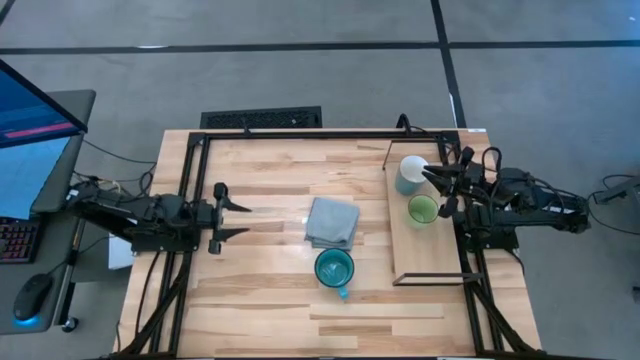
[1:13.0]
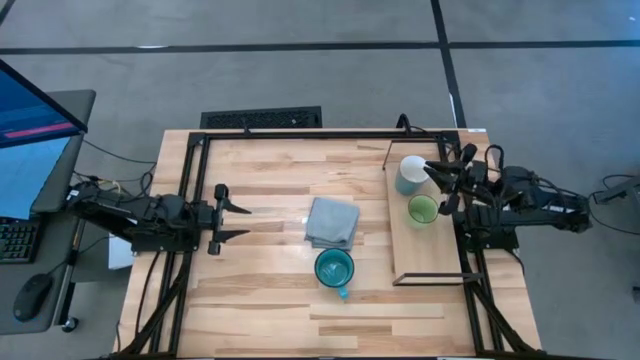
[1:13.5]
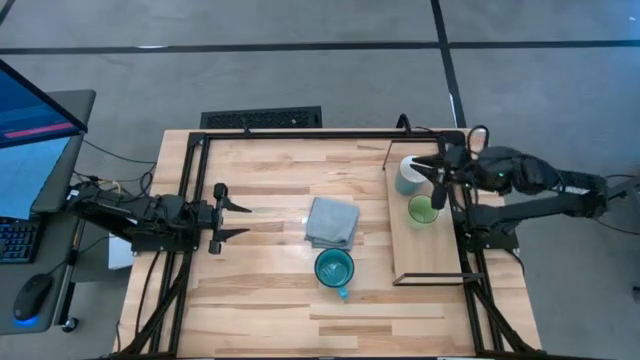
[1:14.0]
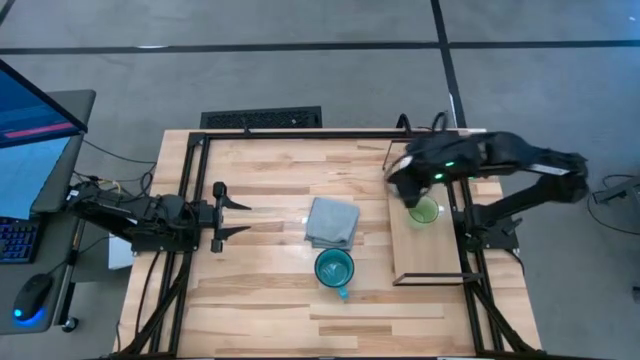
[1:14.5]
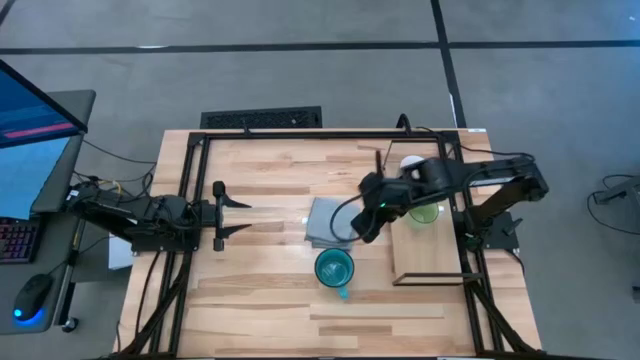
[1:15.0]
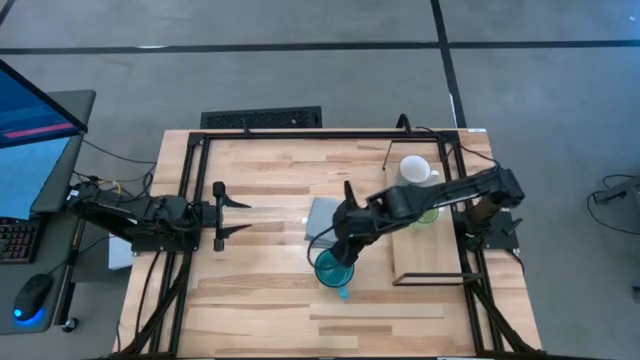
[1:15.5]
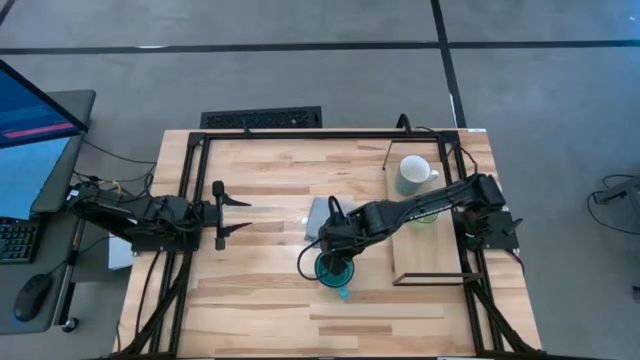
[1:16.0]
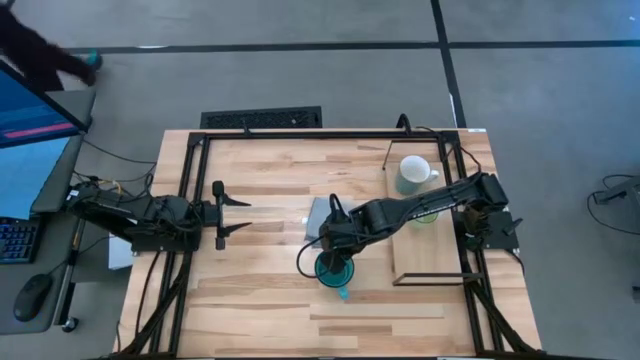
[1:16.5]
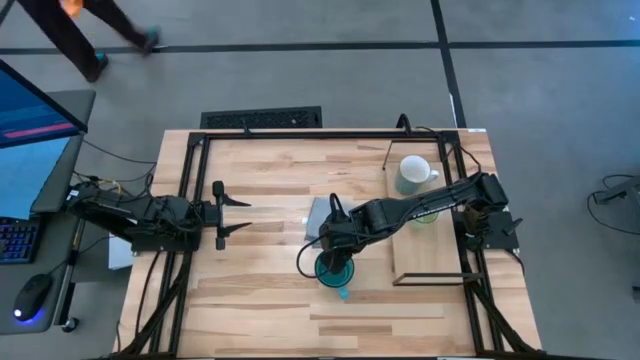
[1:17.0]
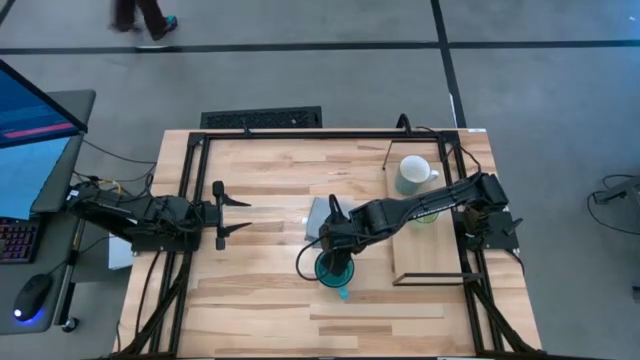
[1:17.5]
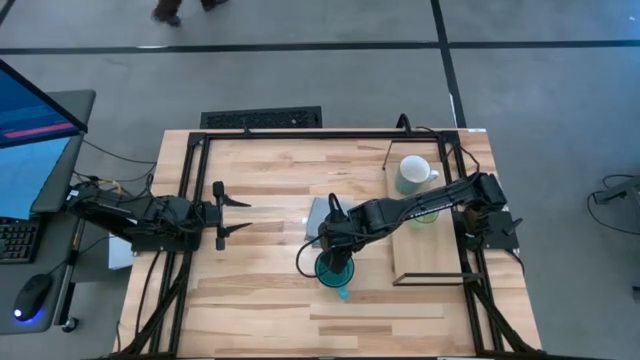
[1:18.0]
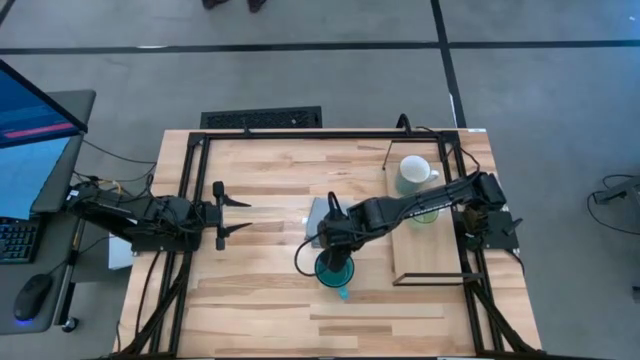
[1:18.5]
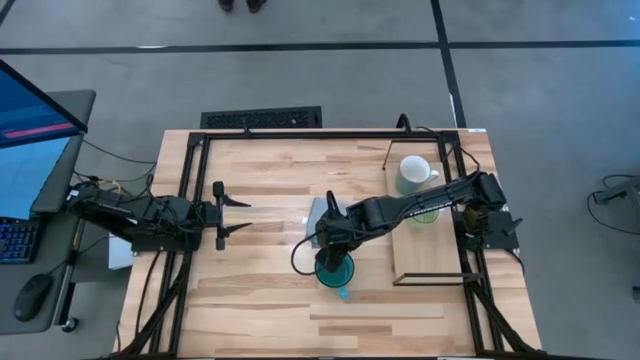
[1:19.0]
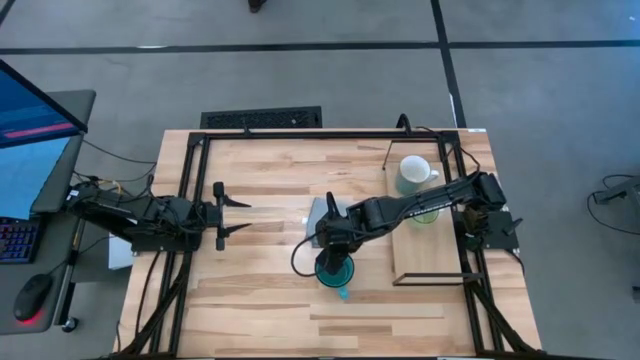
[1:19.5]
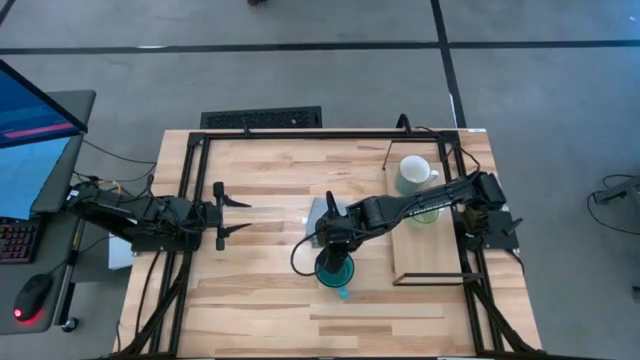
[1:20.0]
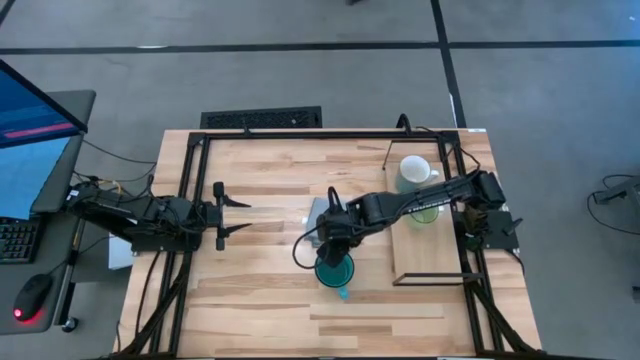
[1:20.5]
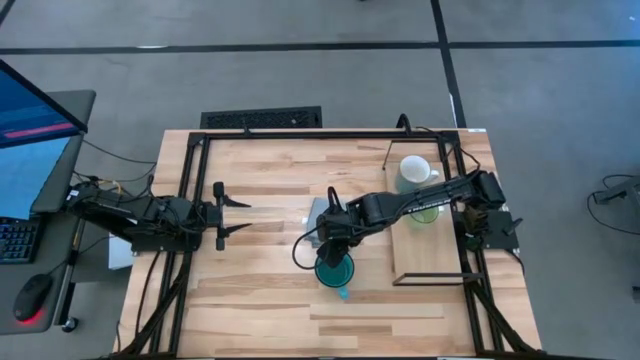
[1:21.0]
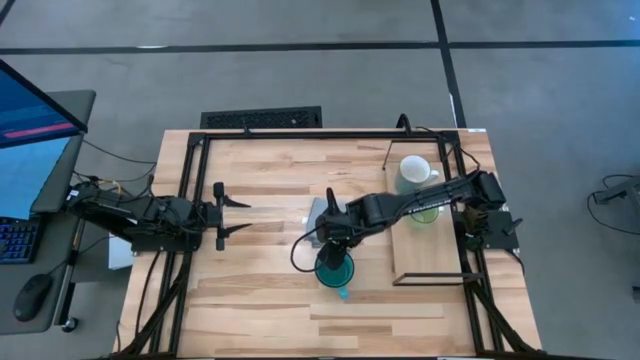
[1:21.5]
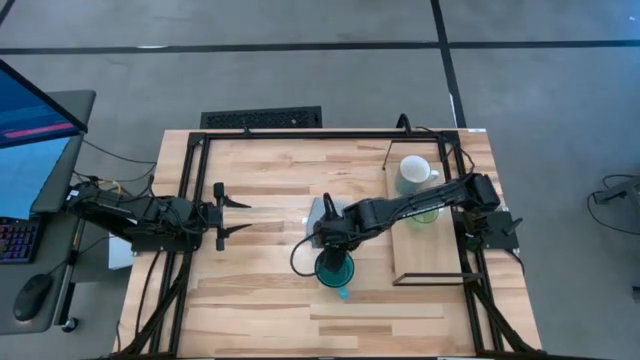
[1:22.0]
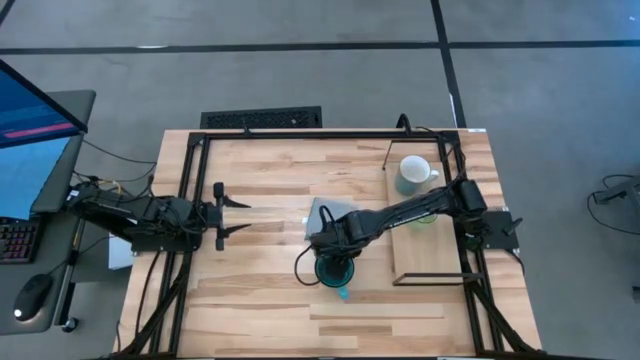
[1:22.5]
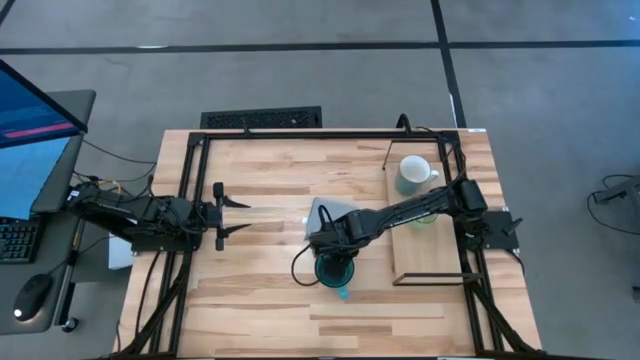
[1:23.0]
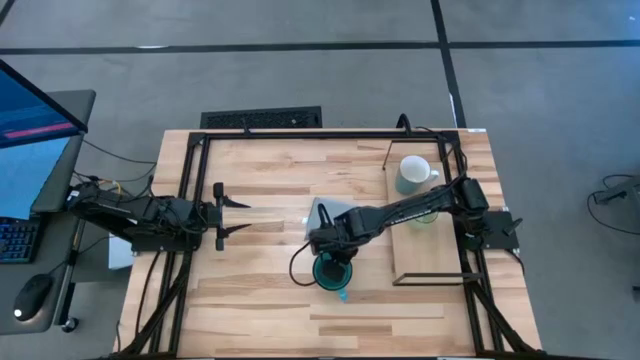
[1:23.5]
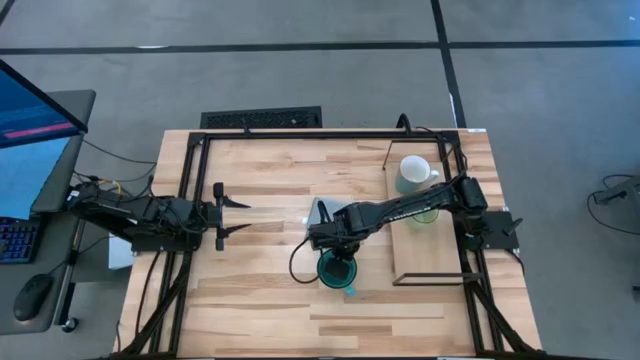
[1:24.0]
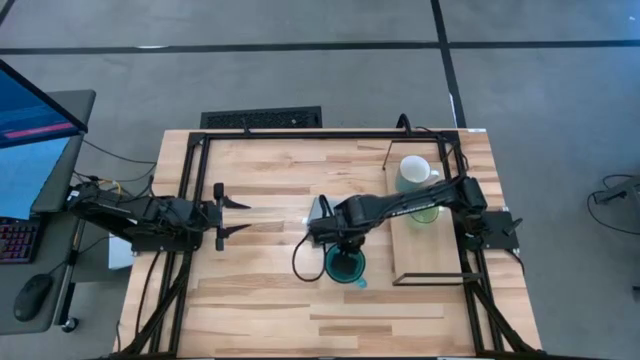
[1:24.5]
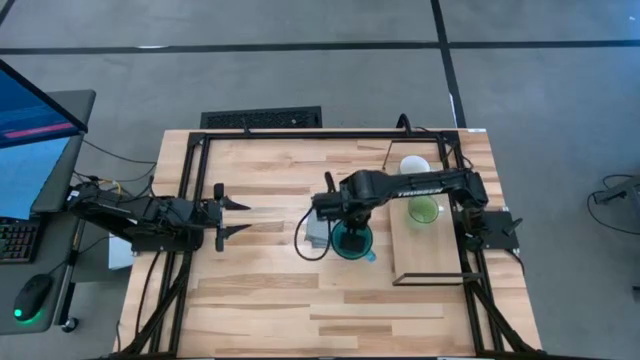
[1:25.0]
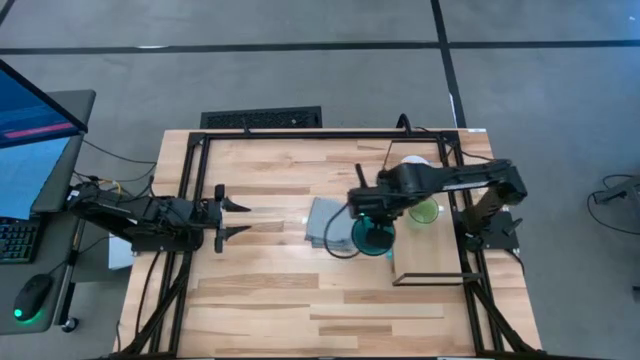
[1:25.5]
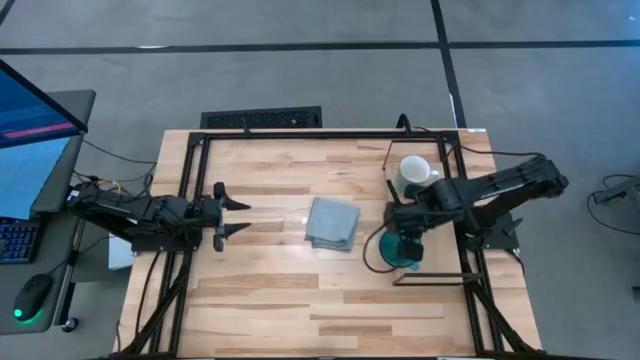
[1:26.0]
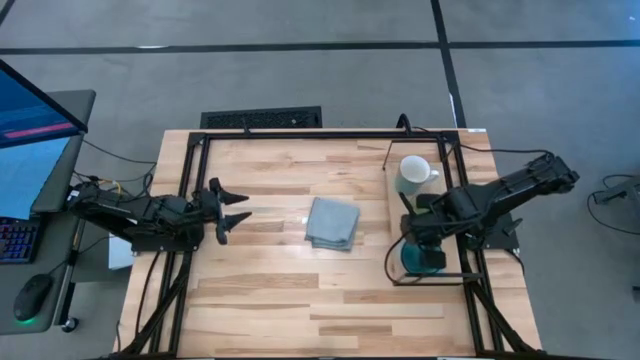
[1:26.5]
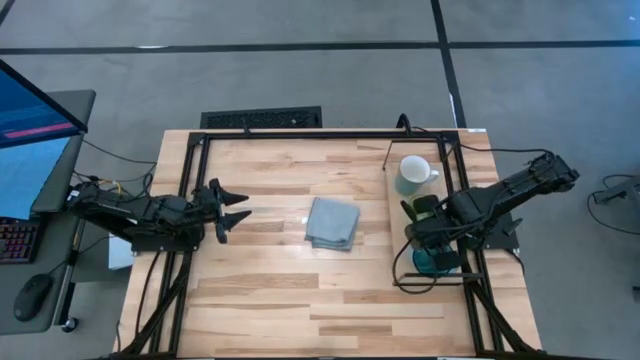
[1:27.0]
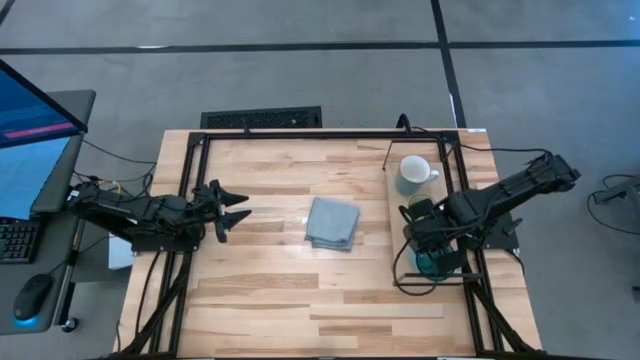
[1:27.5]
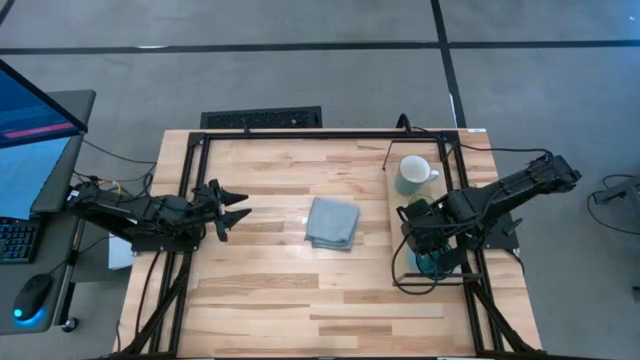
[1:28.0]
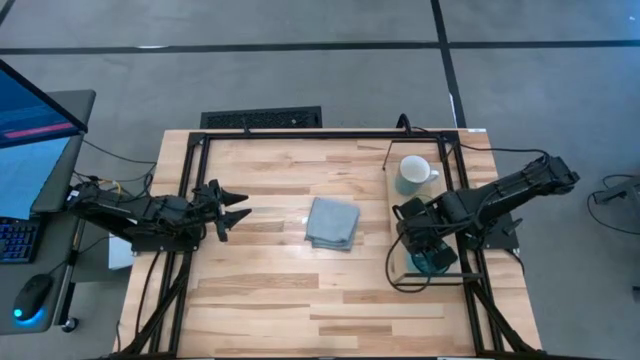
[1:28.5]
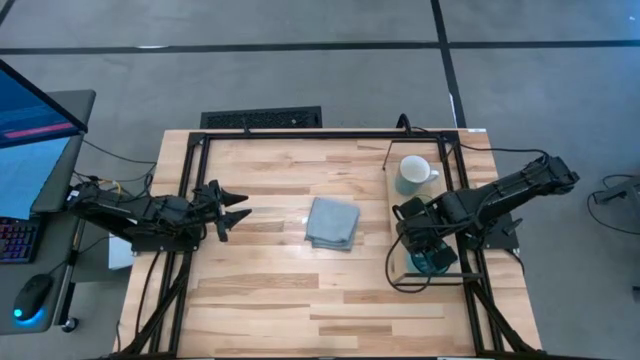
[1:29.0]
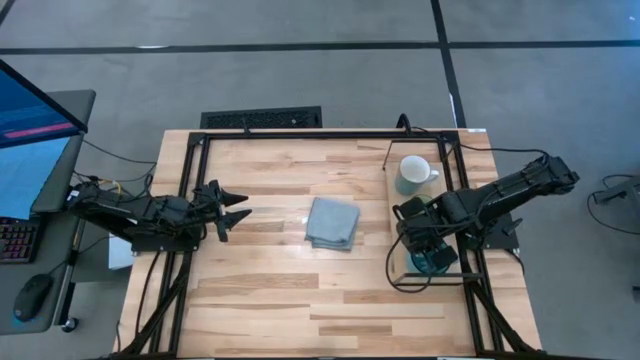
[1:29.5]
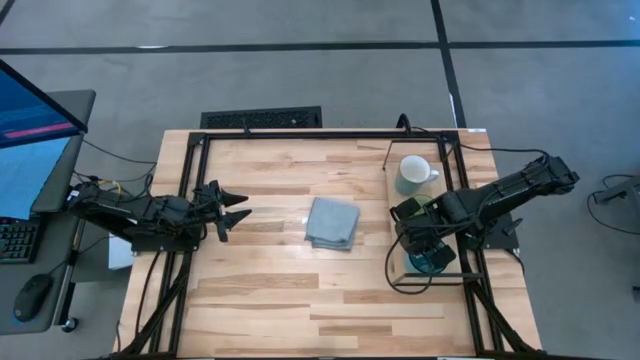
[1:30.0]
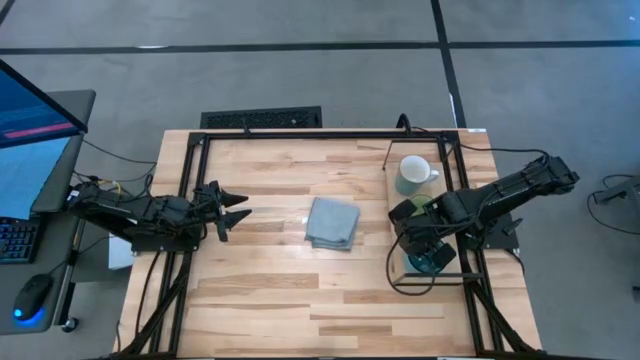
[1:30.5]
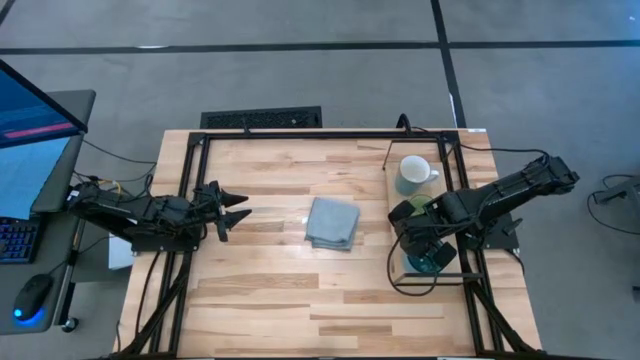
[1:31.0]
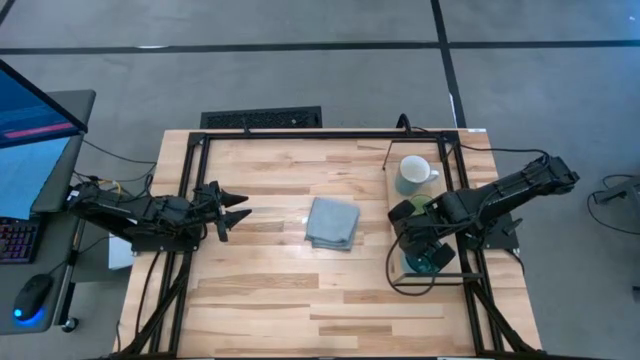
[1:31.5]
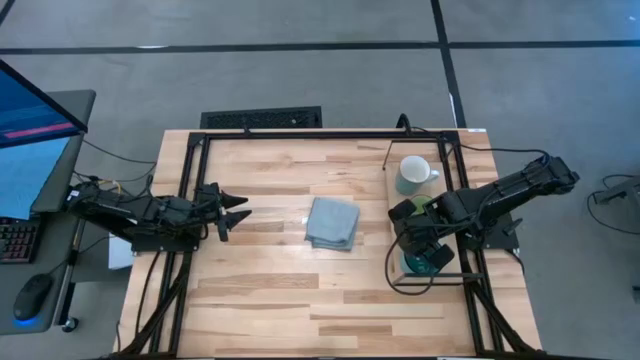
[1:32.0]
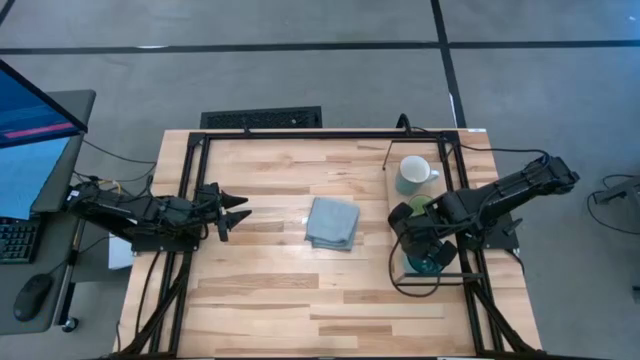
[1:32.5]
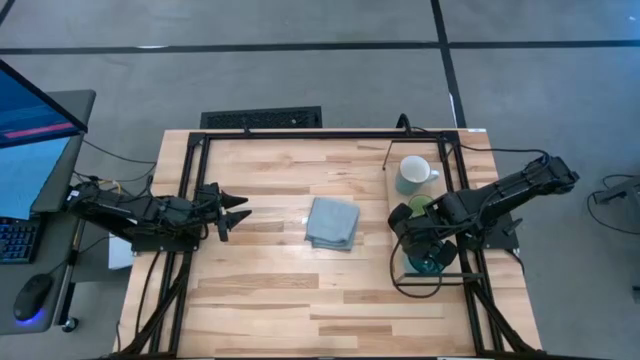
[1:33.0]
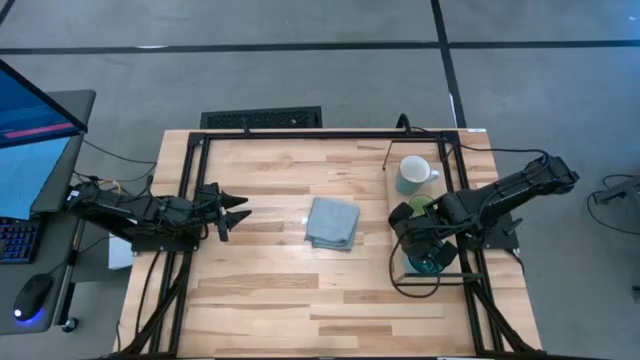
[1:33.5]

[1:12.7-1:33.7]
Task: Stack small to large cups/mugs on shelf
Put the blue mug on the shelf
